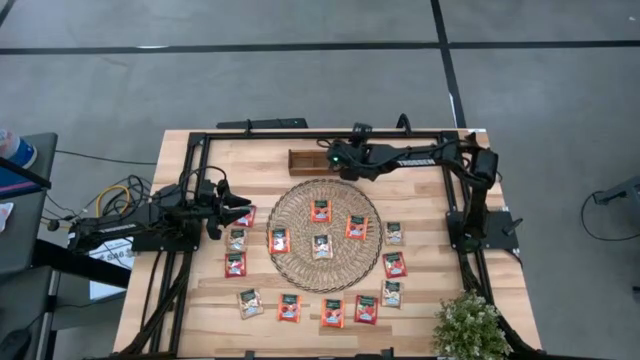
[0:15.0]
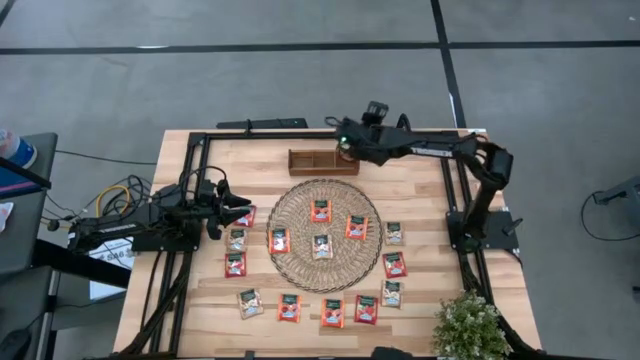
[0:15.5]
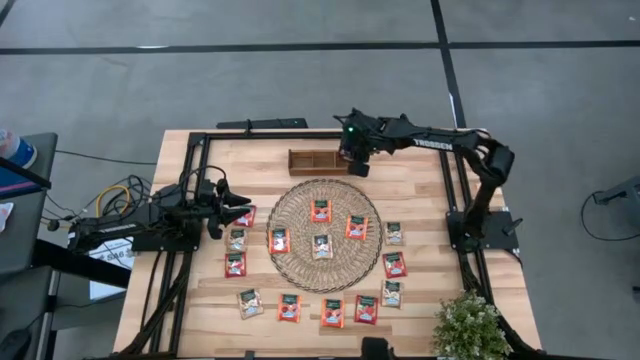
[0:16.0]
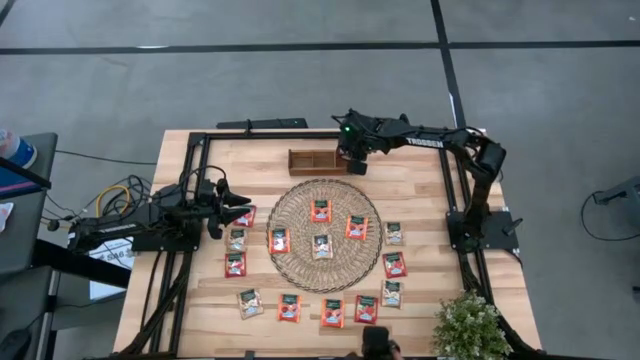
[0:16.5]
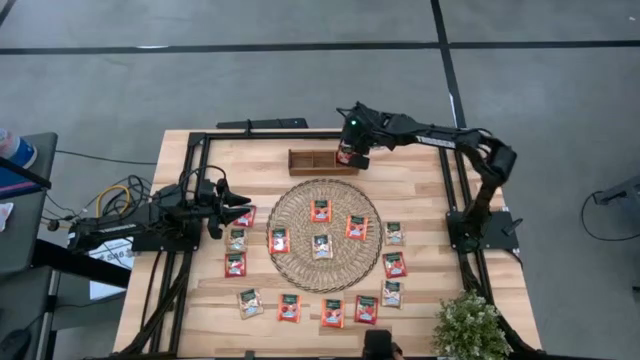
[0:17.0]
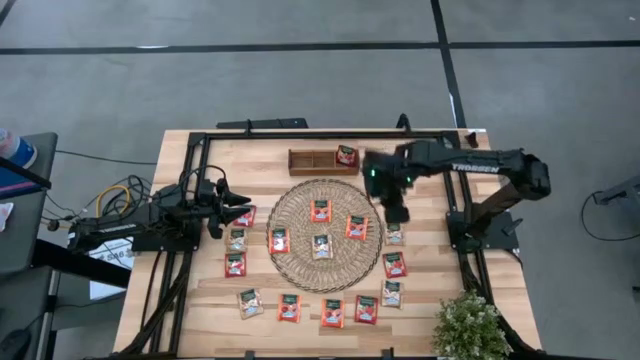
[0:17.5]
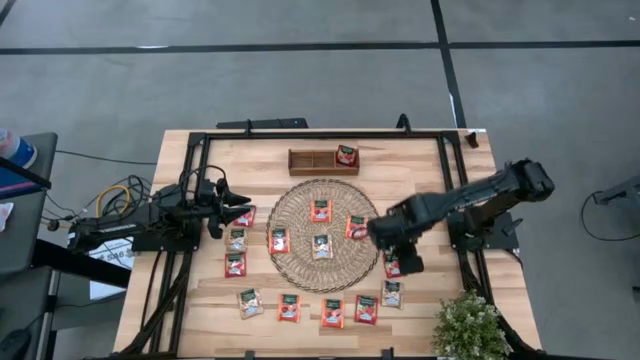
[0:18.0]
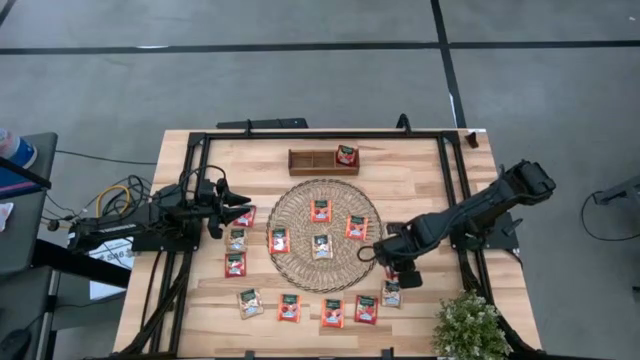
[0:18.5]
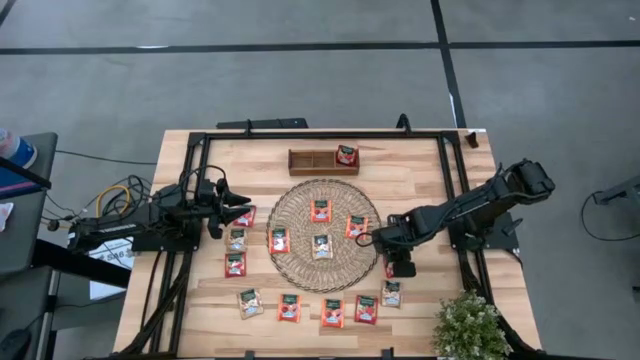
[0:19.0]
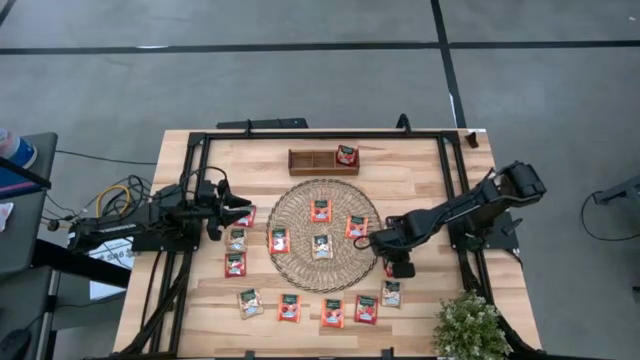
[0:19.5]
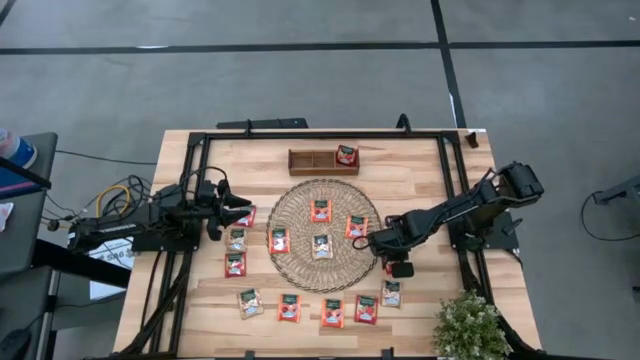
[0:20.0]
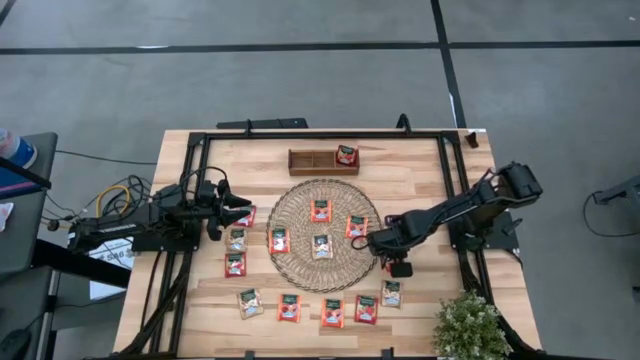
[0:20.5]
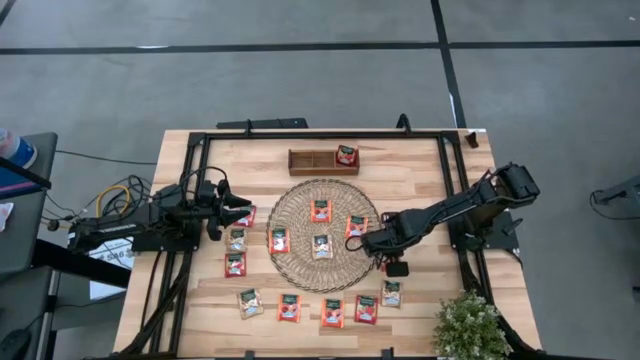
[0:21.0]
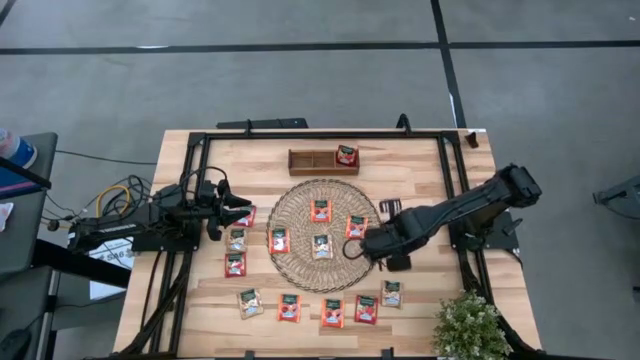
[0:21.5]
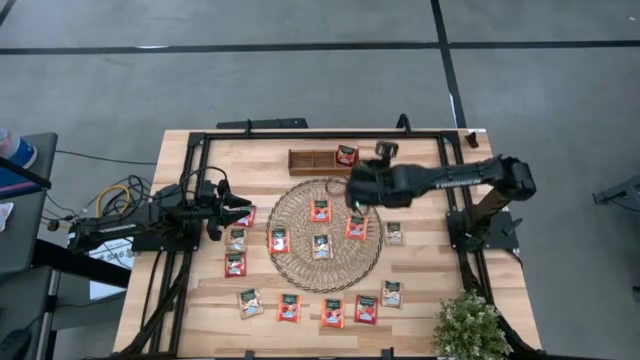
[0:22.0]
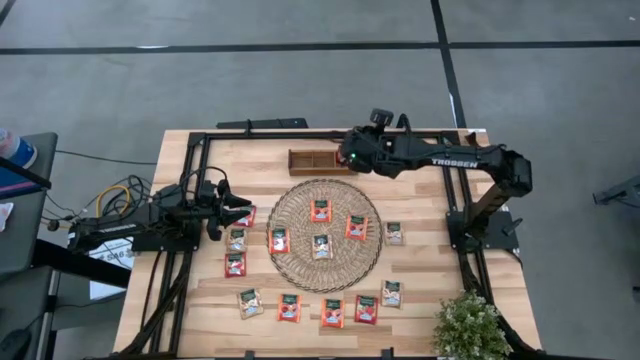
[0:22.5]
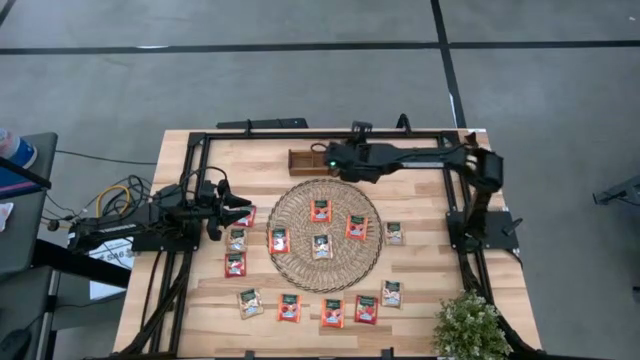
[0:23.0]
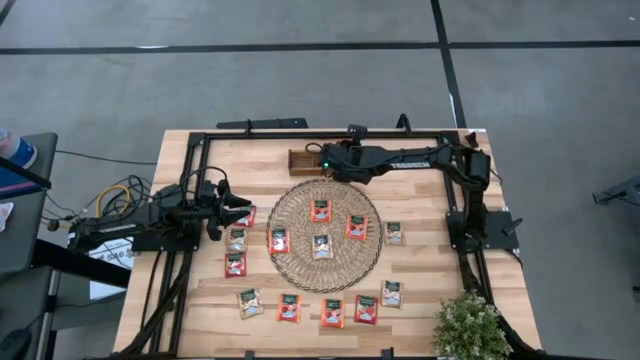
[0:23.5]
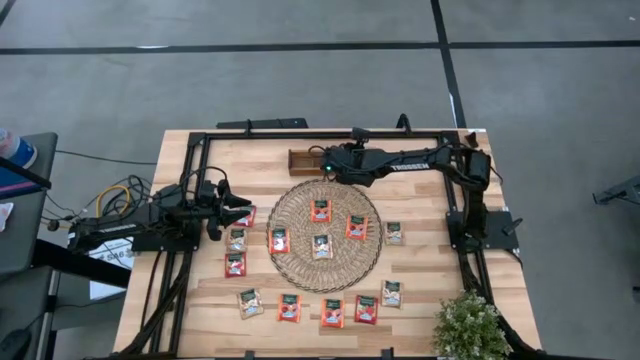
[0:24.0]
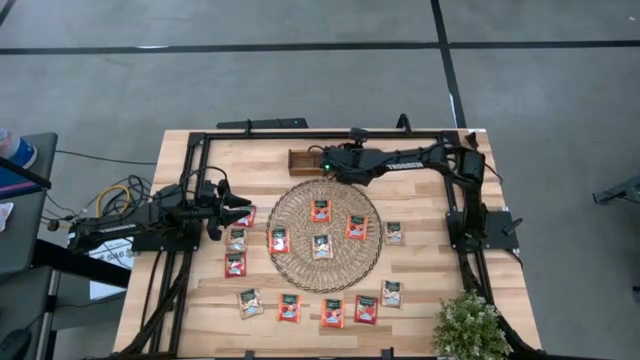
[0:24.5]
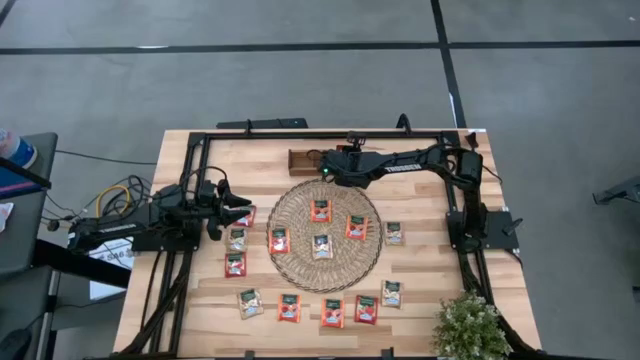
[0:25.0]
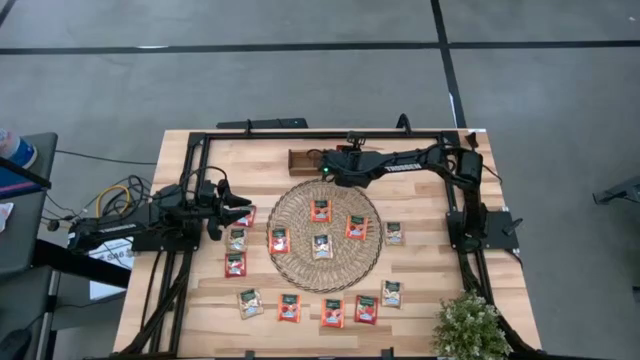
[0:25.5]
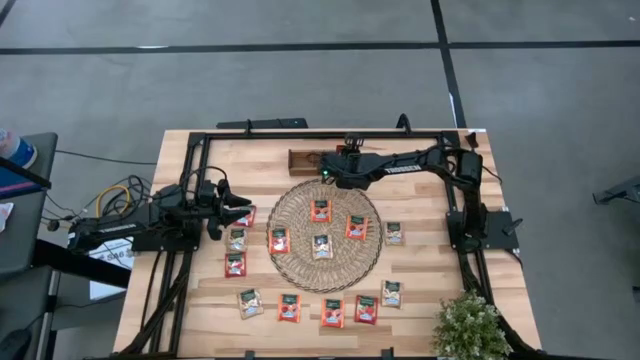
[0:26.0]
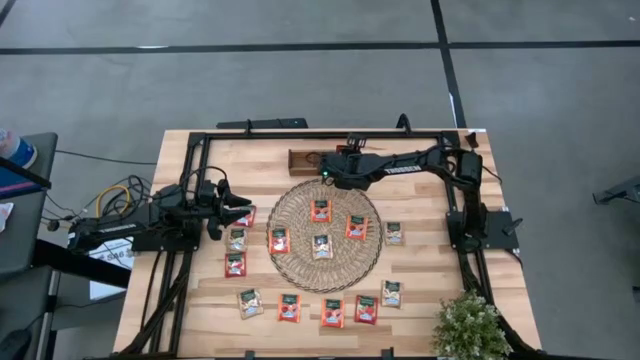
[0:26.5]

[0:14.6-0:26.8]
Task: Pick & Place Tea
Put the red tea bag into the right section of the wooden organizer

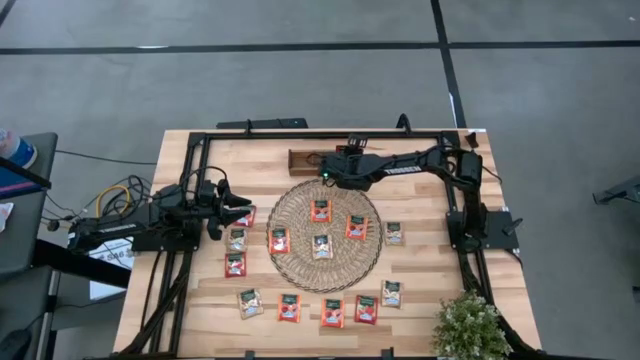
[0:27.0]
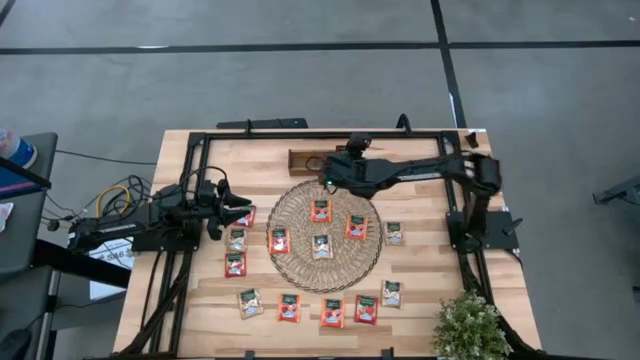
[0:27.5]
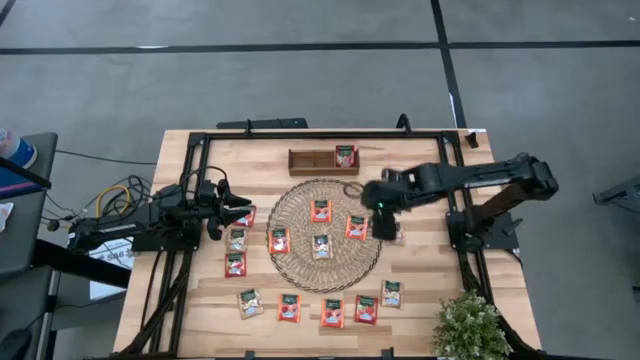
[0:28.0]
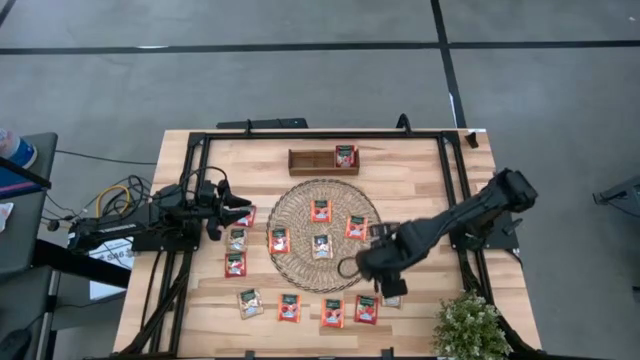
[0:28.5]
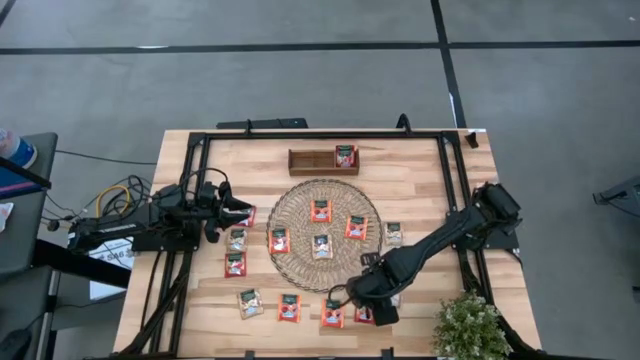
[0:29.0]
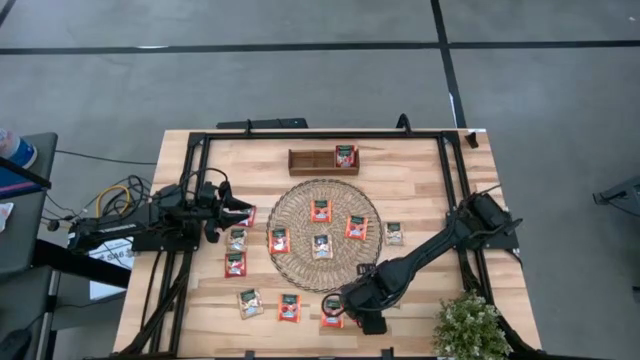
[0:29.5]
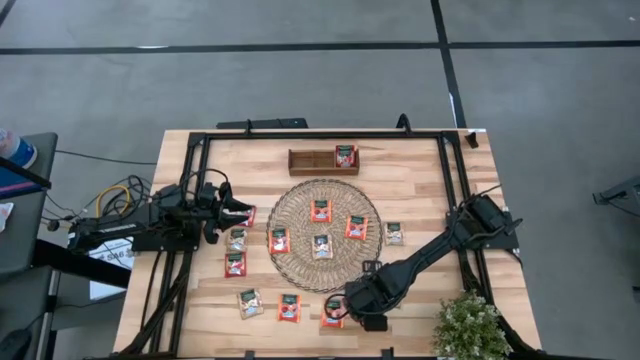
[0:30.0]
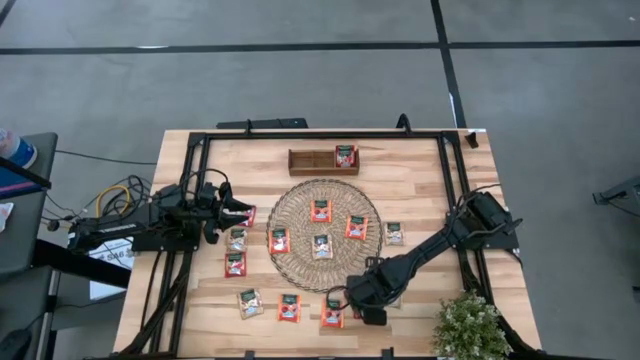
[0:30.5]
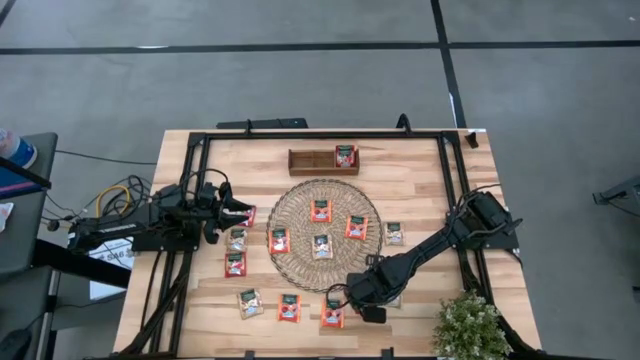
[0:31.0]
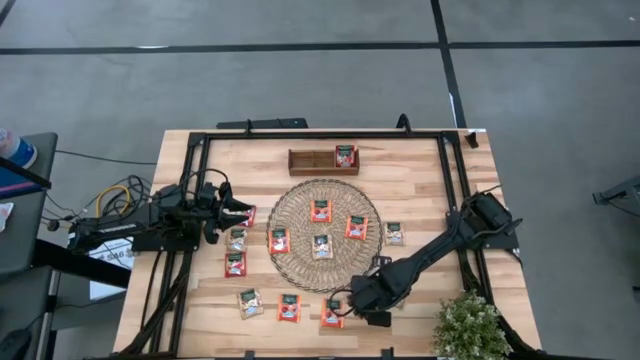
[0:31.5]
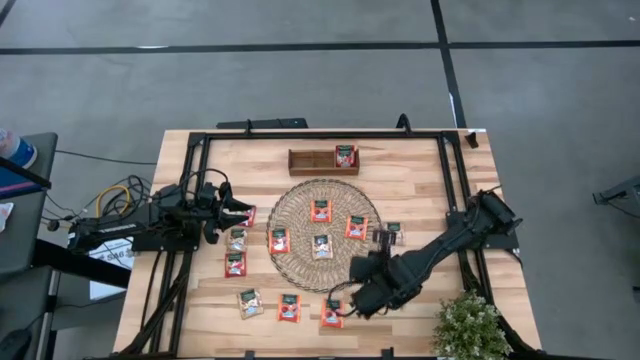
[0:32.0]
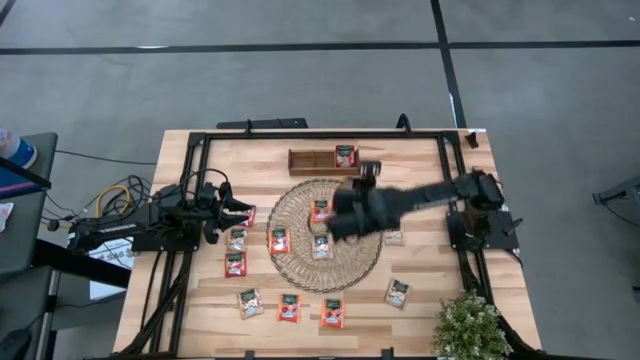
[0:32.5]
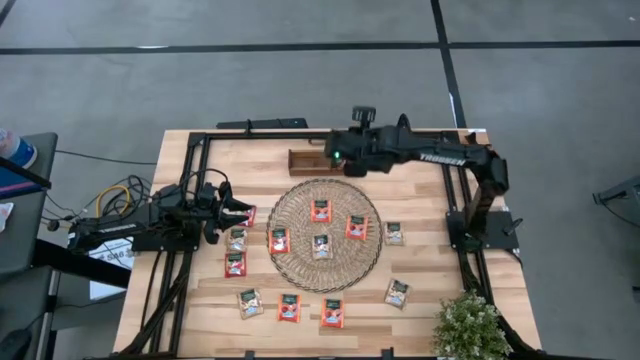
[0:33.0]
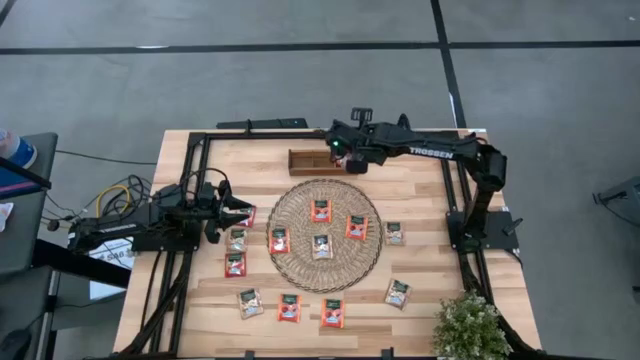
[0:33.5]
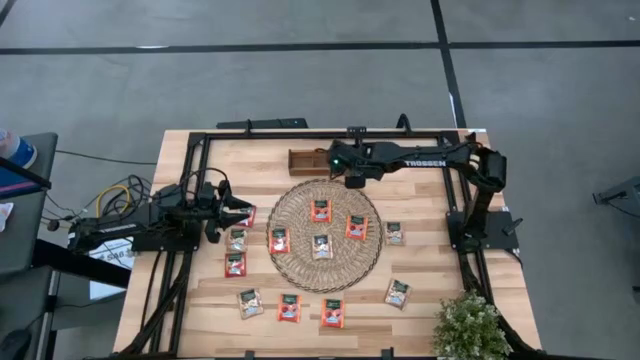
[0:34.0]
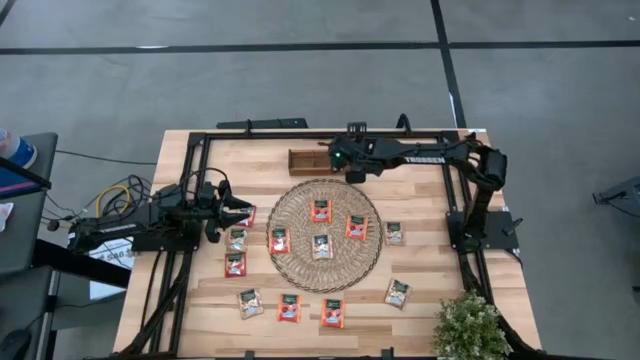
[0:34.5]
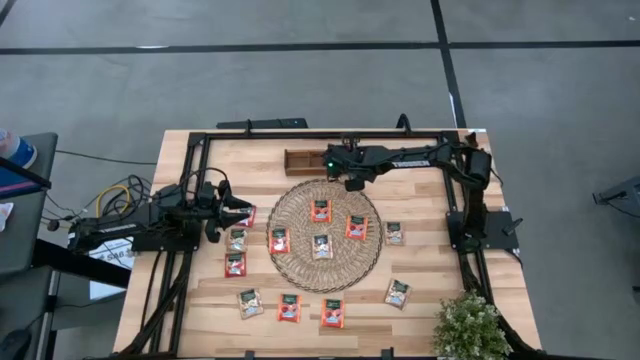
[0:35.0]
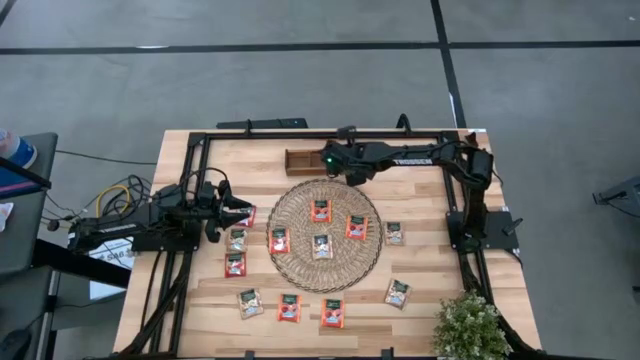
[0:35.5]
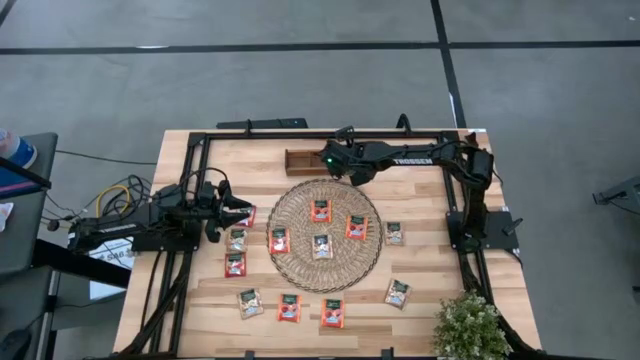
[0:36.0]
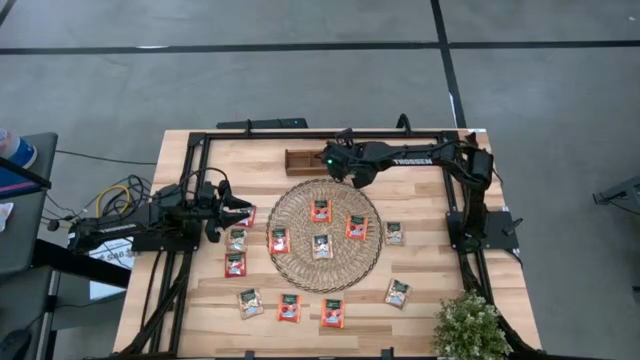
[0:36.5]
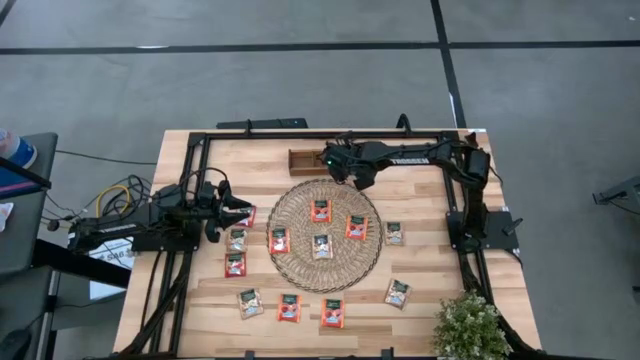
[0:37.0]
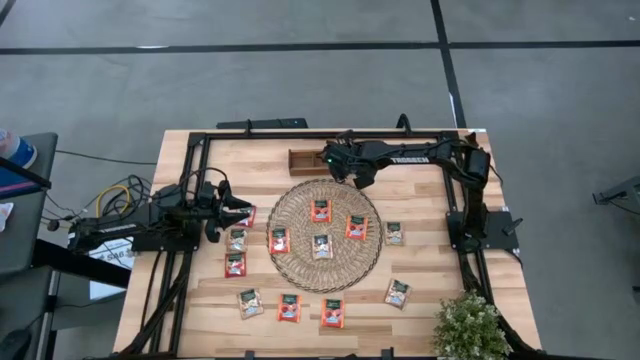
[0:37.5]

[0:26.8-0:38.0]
Put the red tea bag into the right section of the wooden organizer
